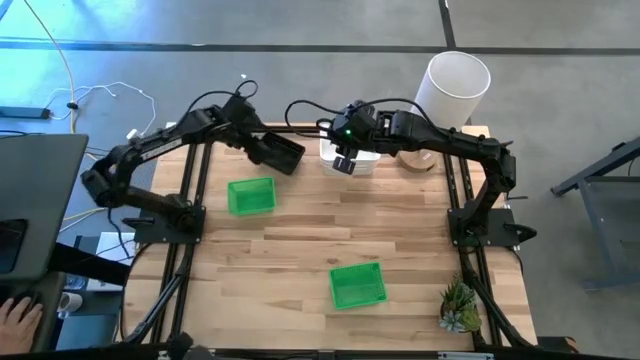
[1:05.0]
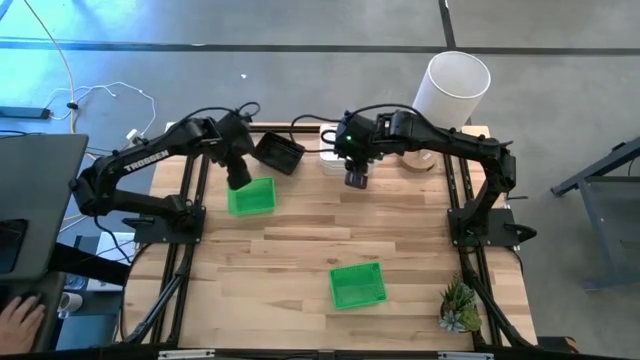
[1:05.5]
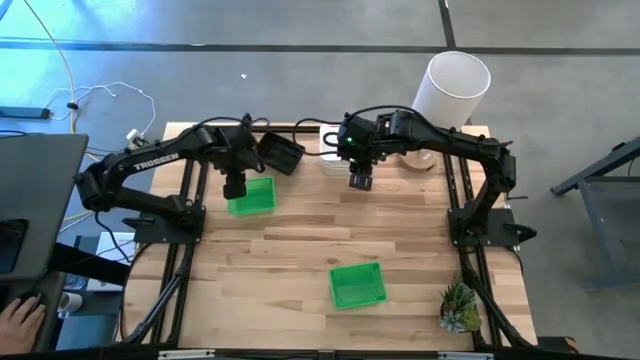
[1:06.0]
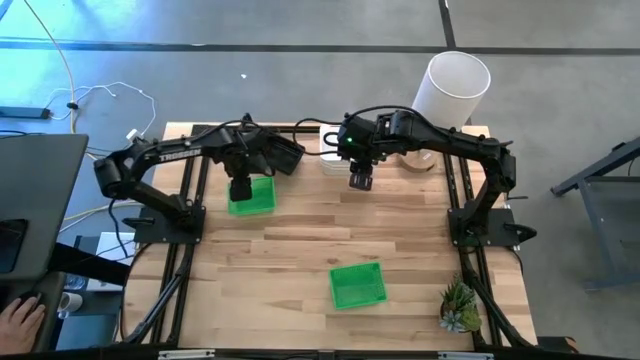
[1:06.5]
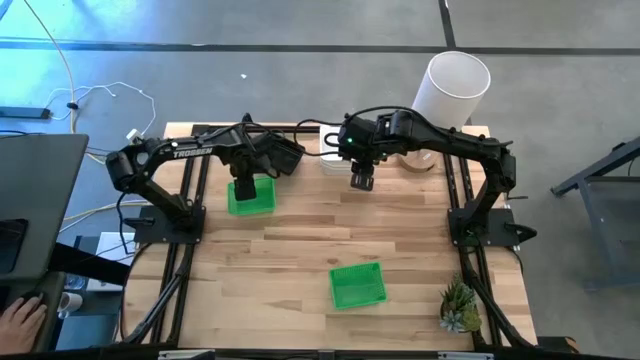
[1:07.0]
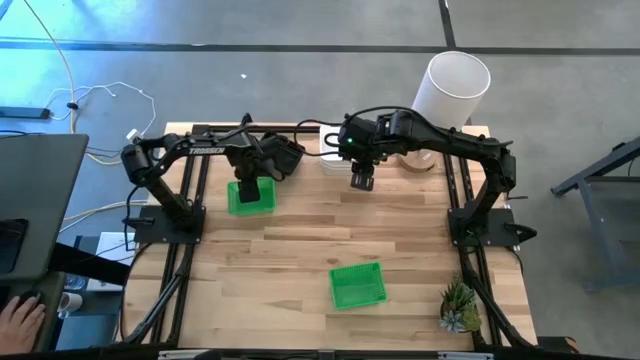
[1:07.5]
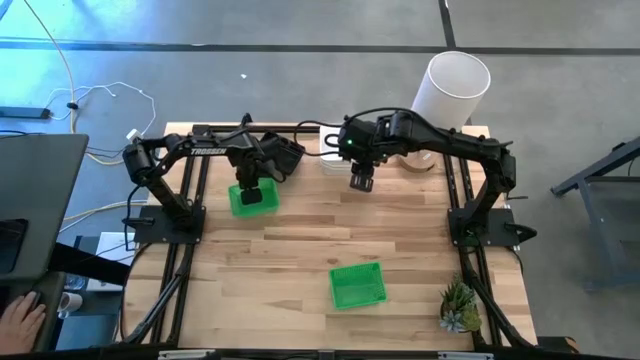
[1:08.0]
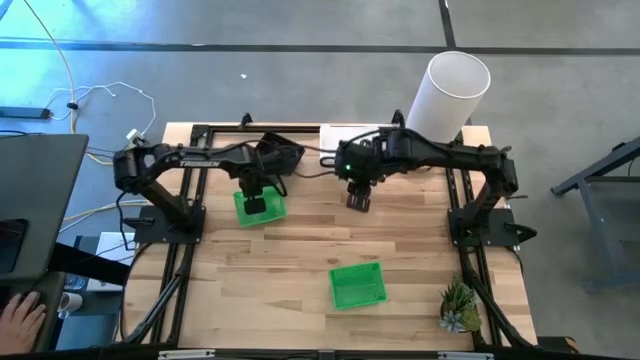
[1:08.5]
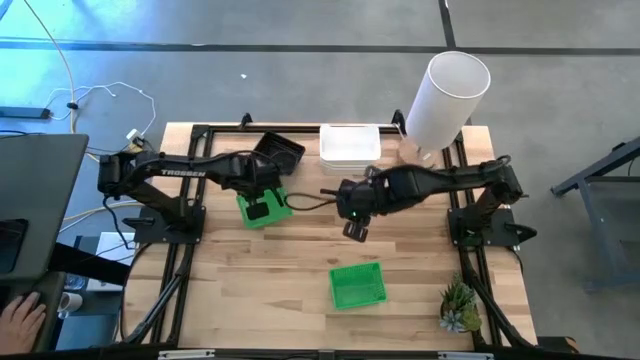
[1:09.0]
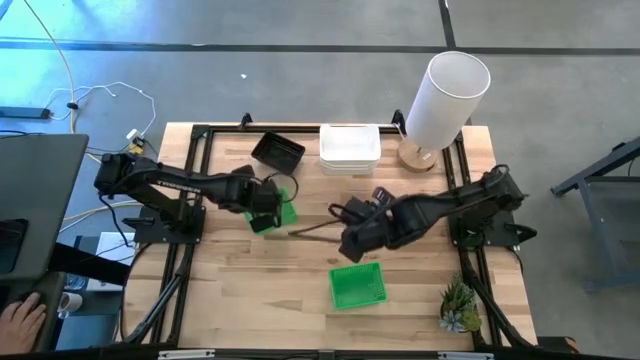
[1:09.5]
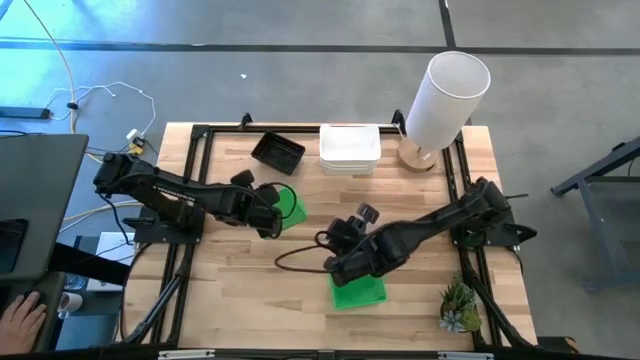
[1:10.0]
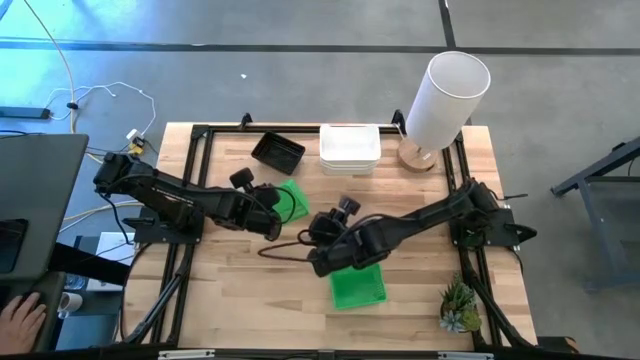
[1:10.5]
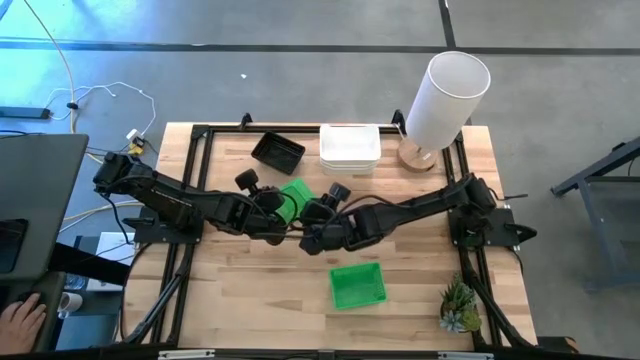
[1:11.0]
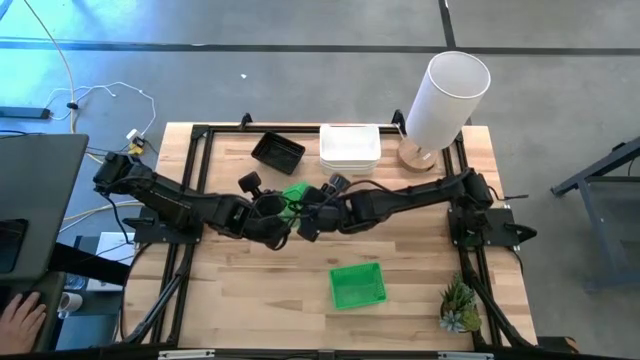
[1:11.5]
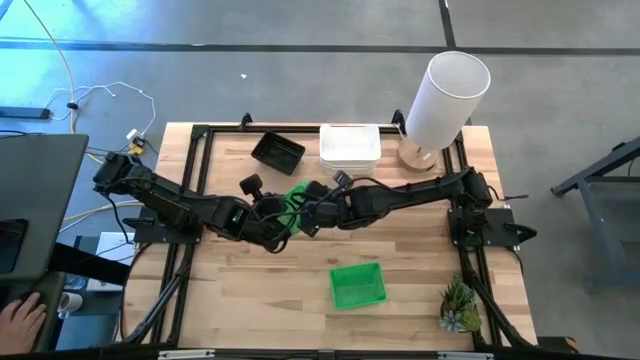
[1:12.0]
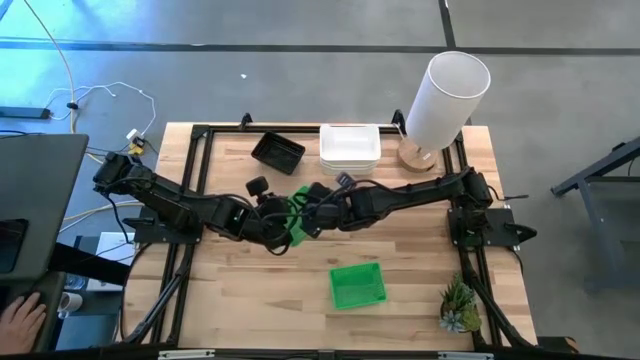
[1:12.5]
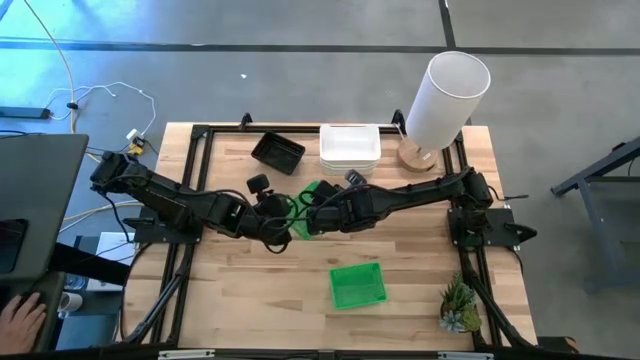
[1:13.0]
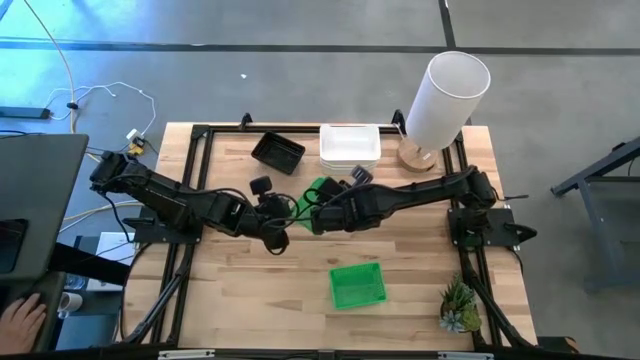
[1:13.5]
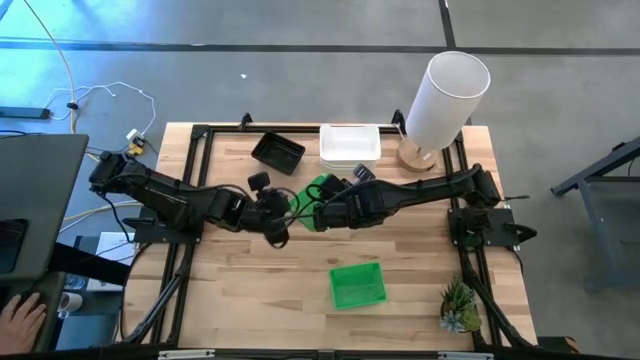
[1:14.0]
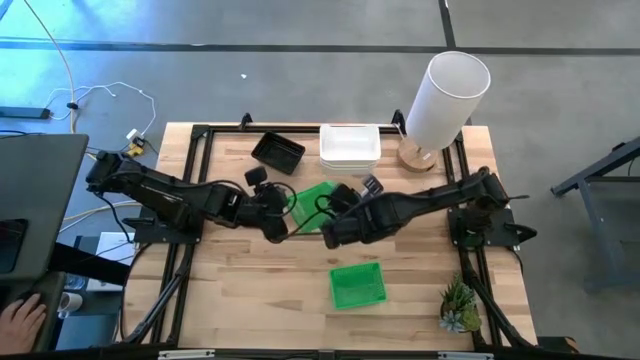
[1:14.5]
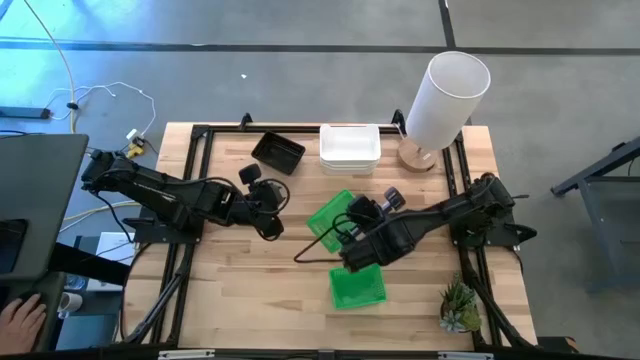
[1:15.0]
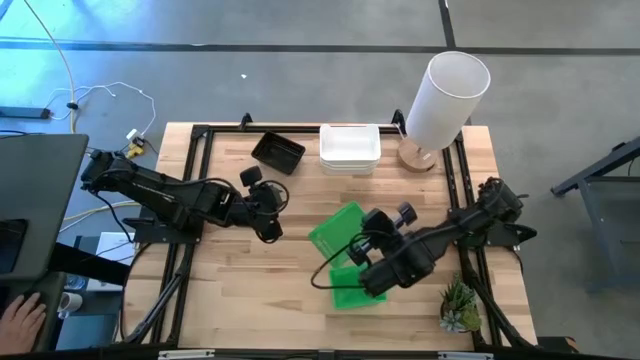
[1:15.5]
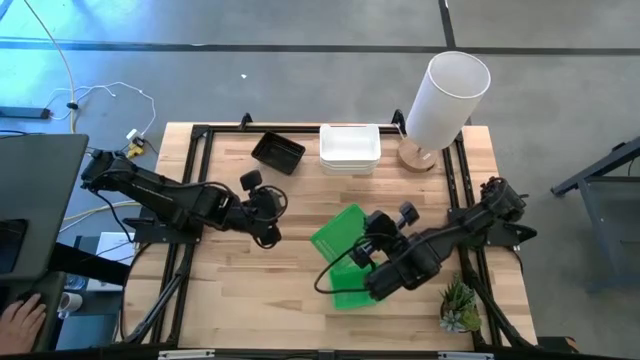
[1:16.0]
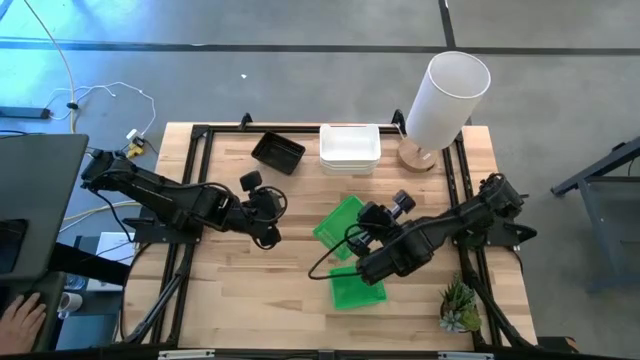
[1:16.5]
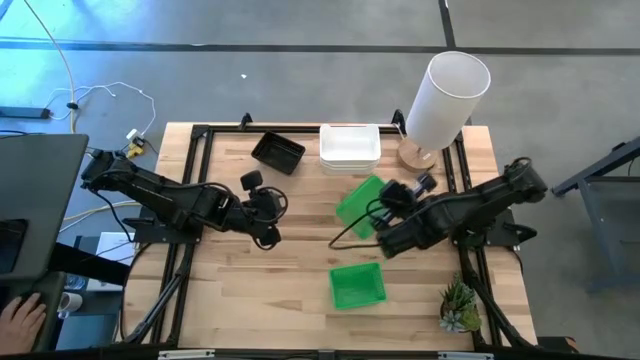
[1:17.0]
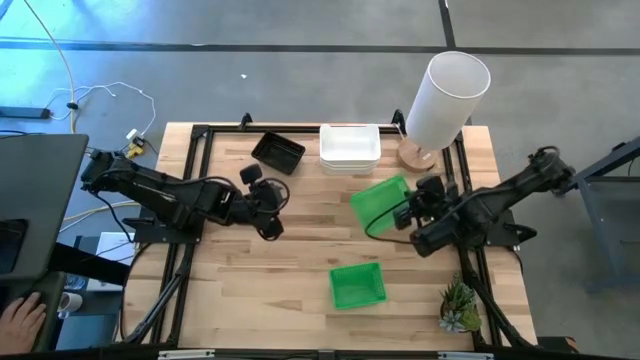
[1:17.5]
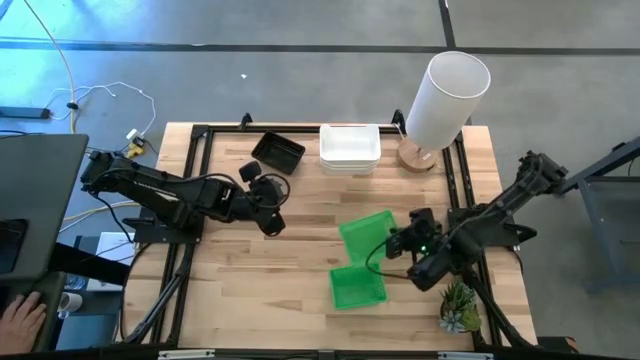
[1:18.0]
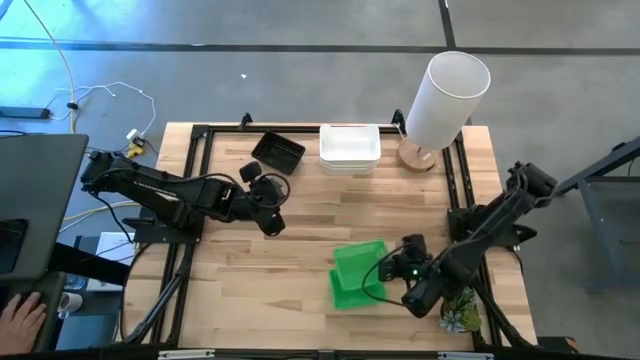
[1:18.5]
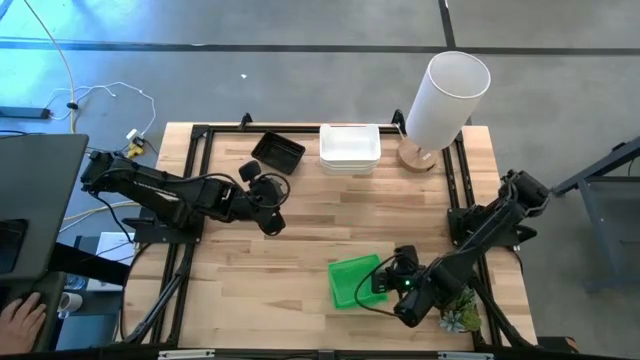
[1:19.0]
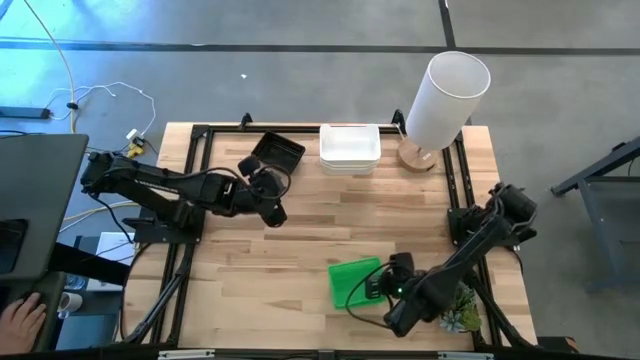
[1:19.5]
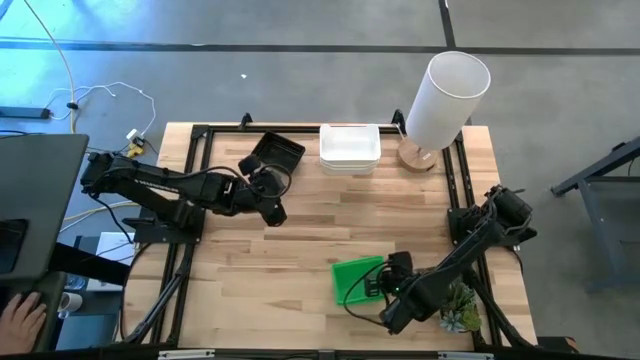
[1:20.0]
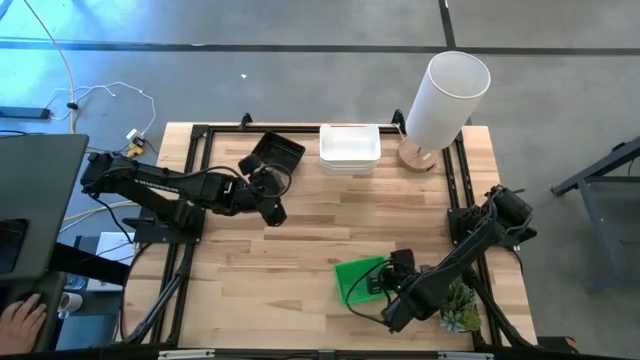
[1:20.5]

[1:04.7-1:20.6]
Task: Stack baskets on shelf by color
Stack the top green bin on the stacked green bins

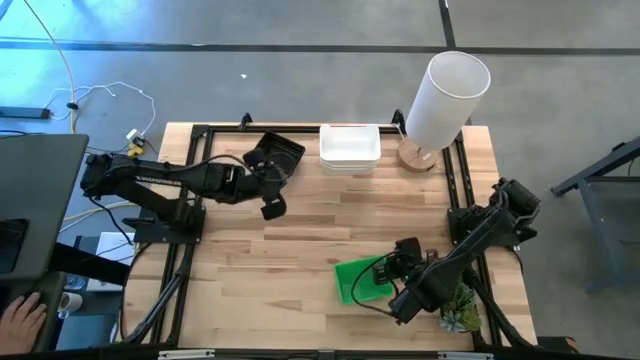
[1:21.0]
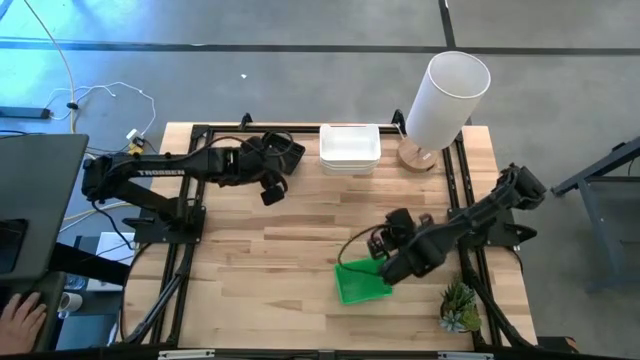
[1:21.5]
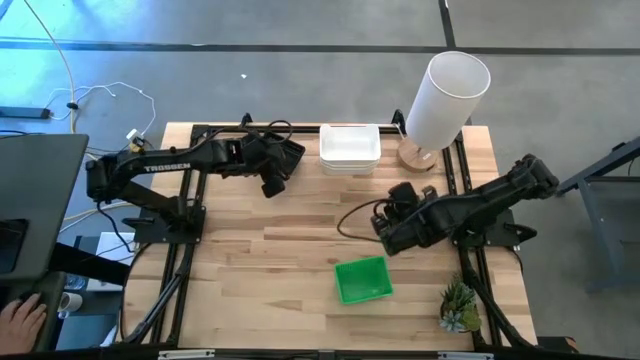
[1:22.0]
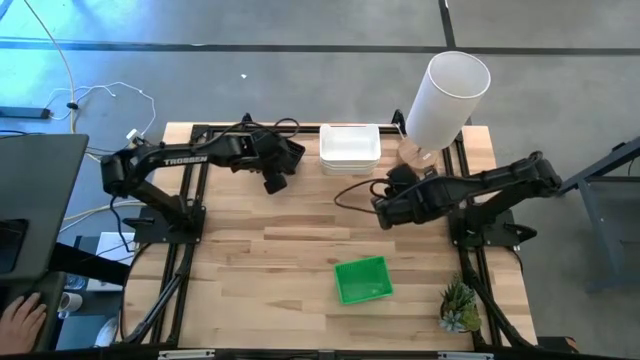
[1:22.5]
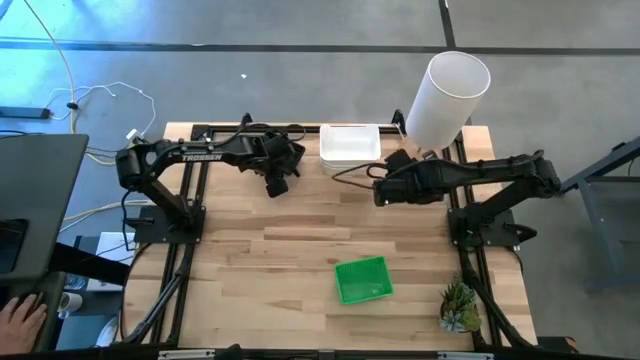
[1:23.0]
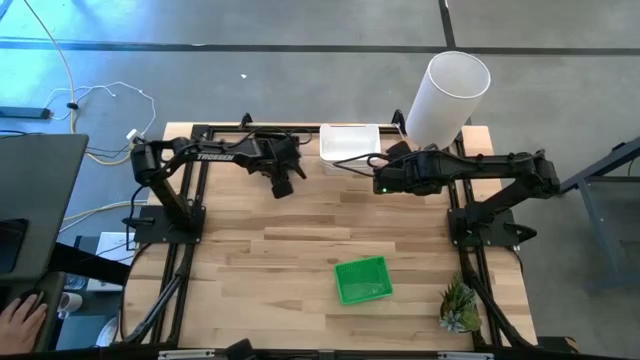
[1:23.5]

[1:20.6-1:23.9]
Adjust the stacked black bins on the shelf

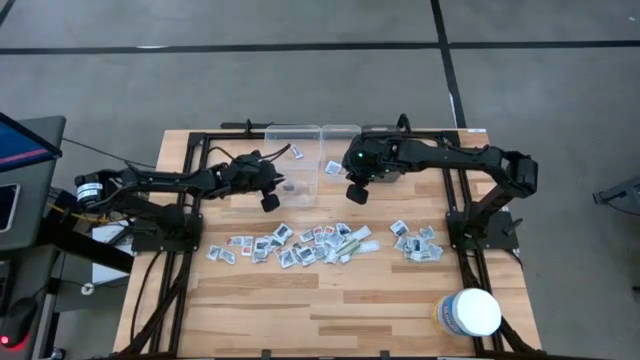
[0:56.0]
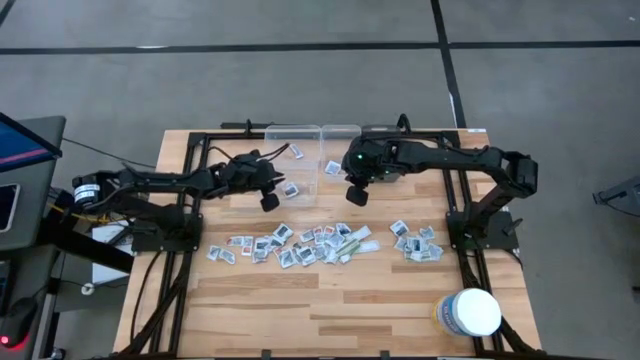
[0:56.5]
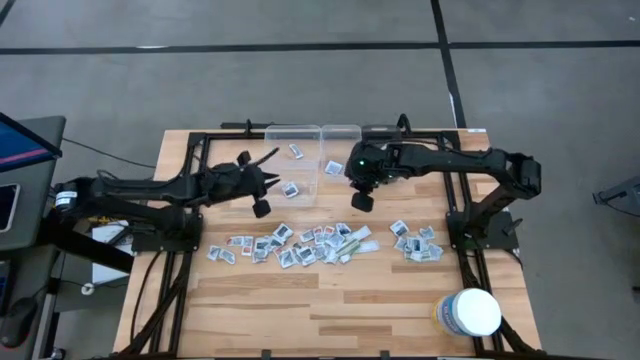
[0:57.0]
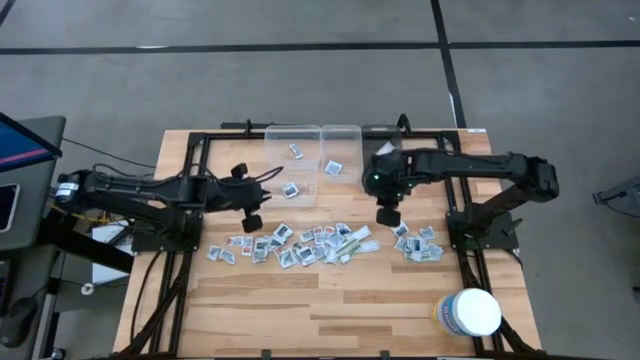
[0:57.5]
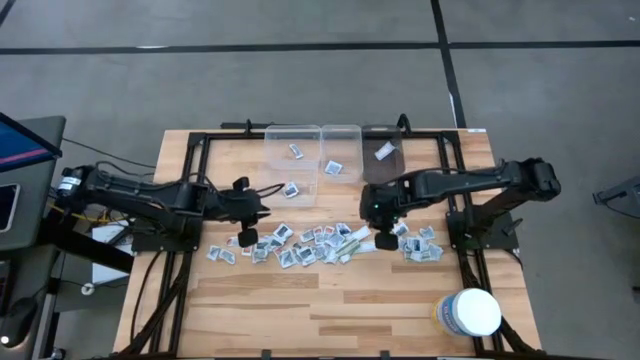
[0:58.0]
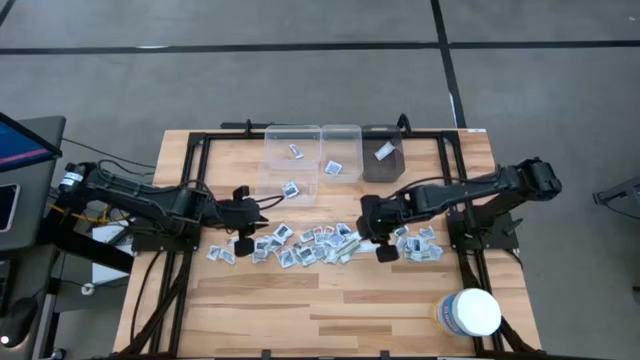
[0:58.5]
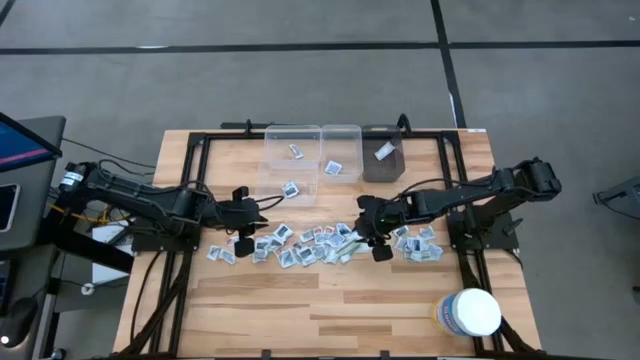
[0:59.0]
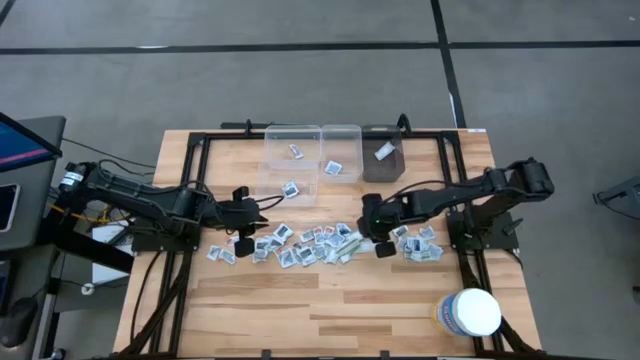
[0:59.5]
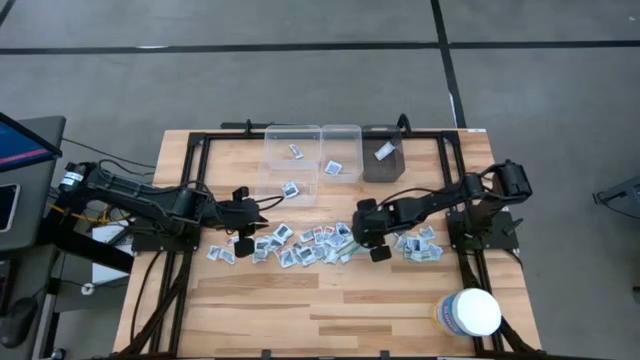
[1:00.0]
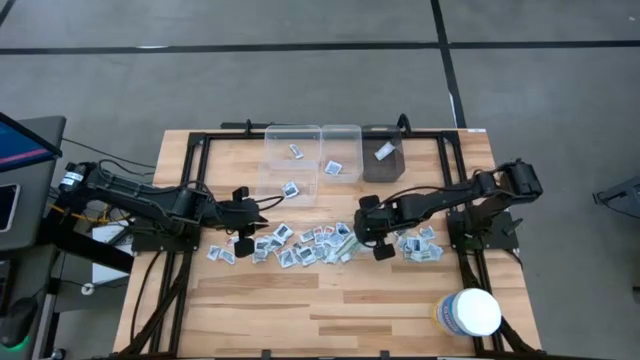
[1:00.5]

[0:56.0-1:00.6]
Task: Pick & Place First Aid Supplies
Put the bandage pack into the black transparent bin
